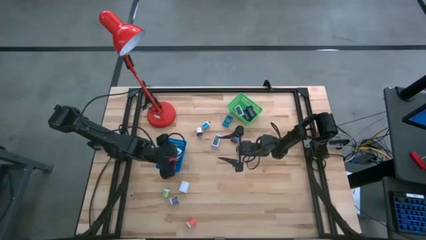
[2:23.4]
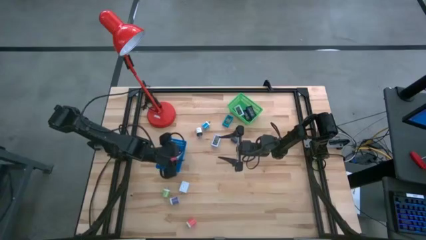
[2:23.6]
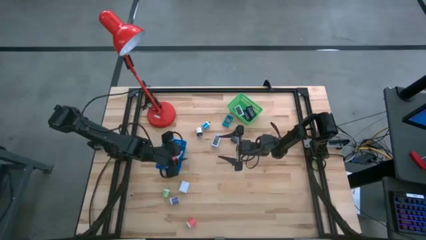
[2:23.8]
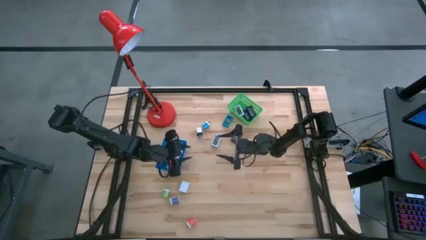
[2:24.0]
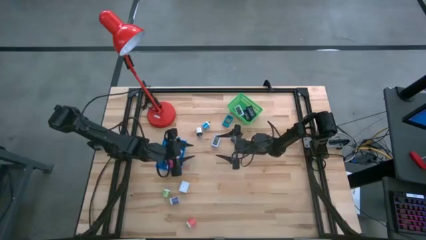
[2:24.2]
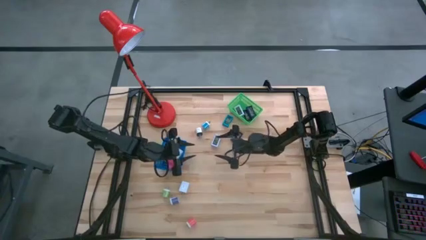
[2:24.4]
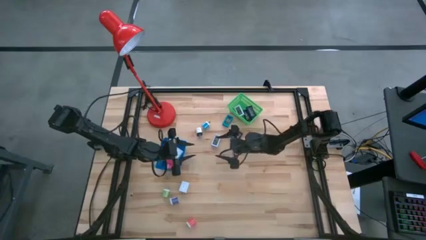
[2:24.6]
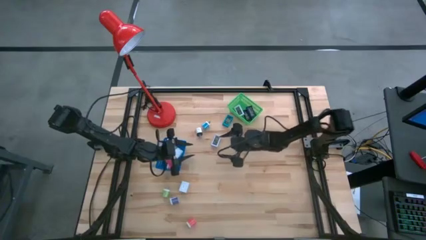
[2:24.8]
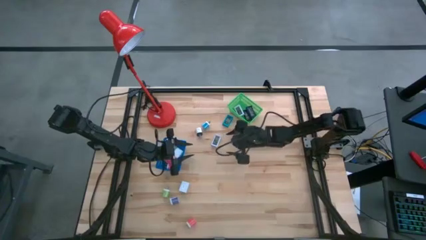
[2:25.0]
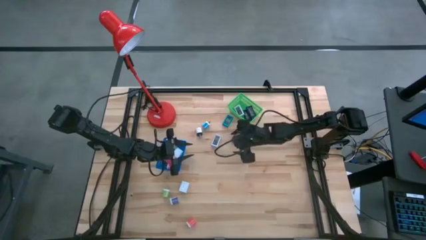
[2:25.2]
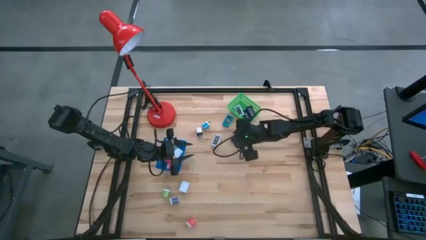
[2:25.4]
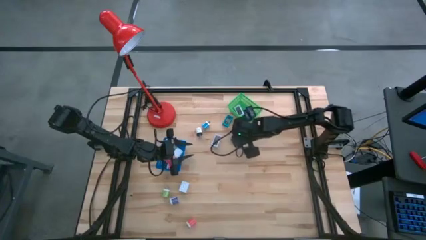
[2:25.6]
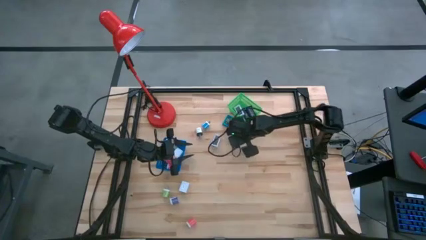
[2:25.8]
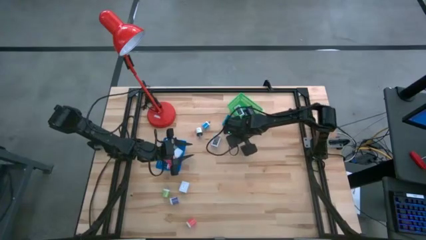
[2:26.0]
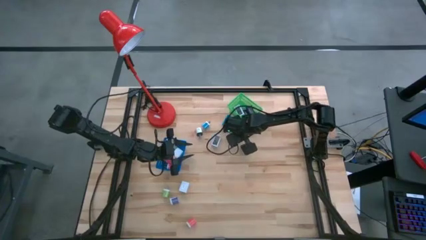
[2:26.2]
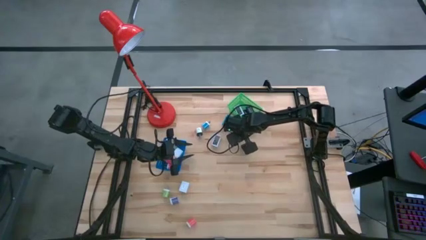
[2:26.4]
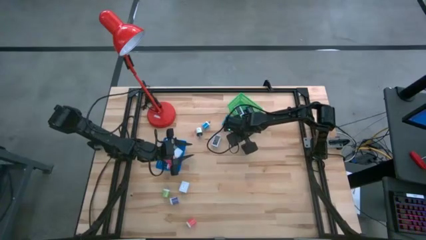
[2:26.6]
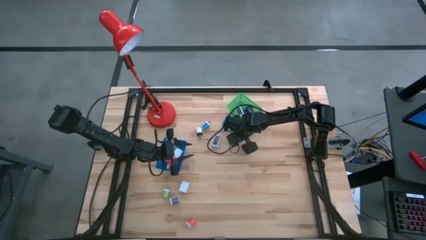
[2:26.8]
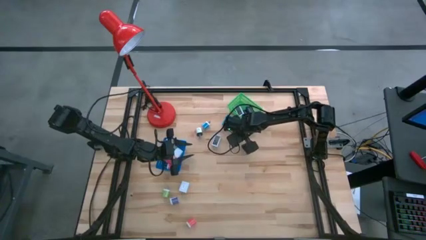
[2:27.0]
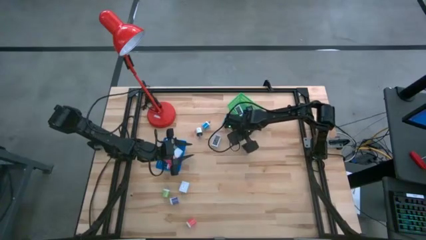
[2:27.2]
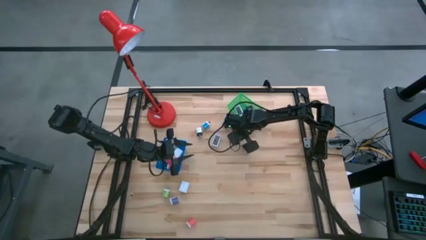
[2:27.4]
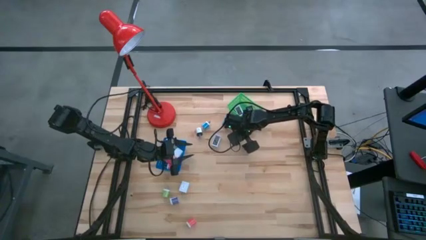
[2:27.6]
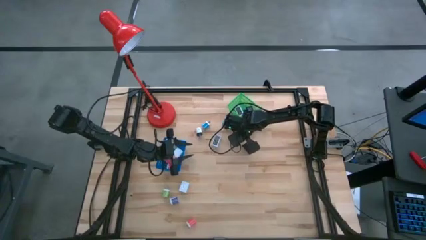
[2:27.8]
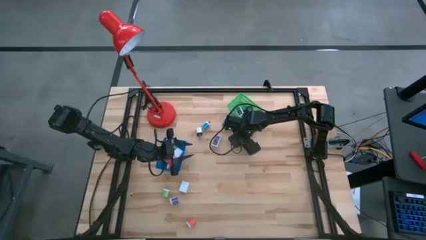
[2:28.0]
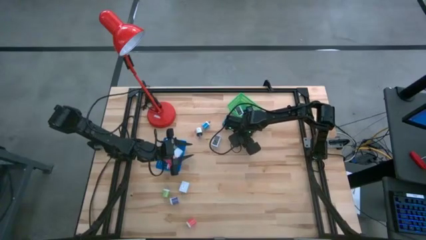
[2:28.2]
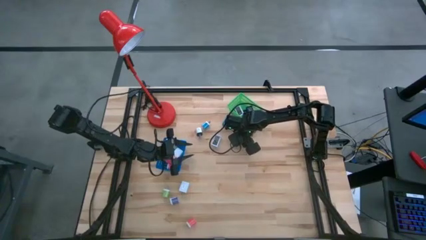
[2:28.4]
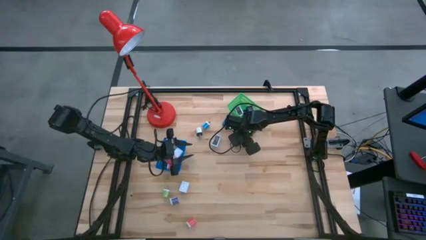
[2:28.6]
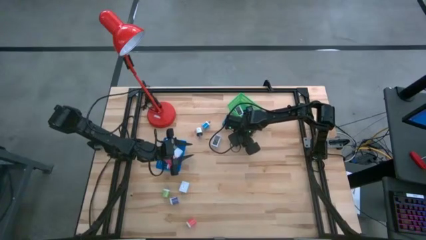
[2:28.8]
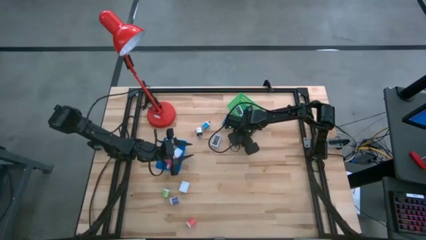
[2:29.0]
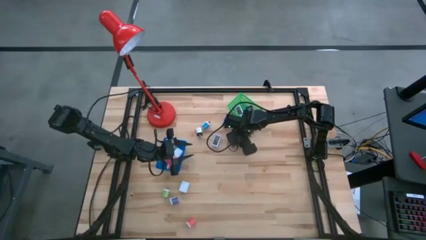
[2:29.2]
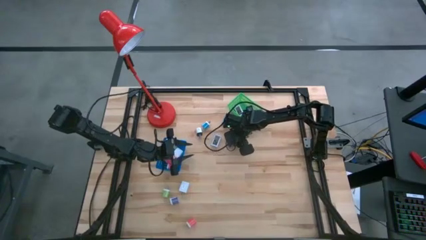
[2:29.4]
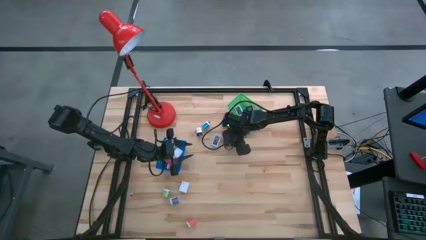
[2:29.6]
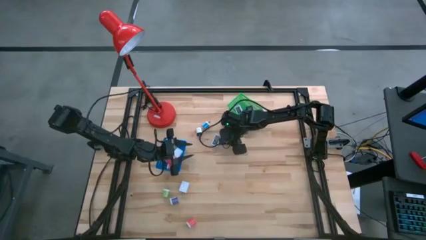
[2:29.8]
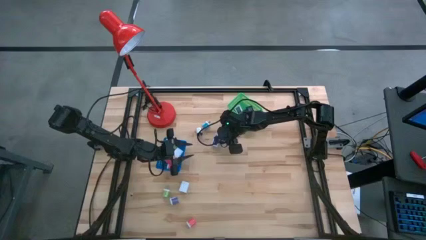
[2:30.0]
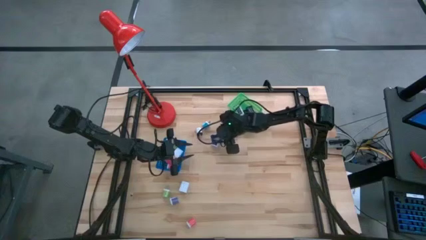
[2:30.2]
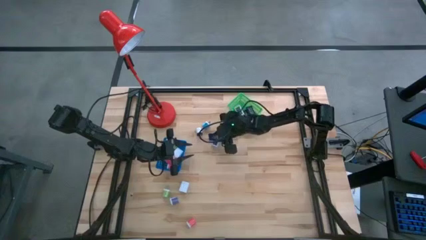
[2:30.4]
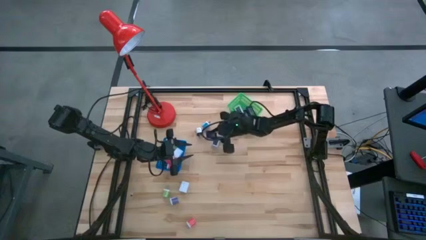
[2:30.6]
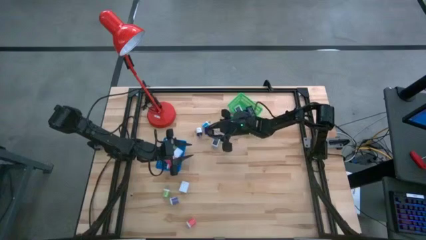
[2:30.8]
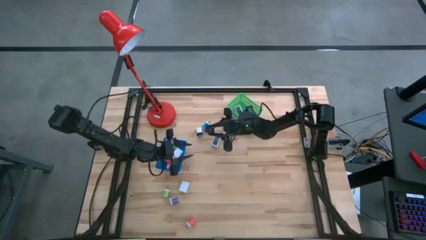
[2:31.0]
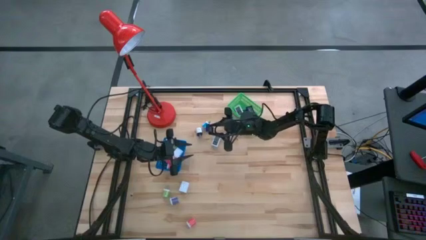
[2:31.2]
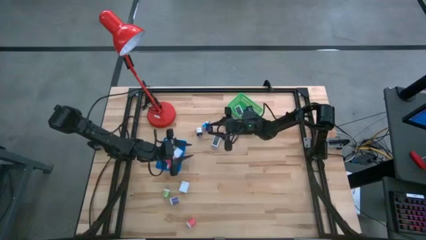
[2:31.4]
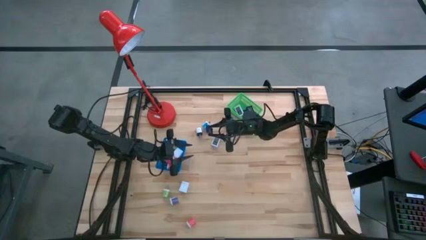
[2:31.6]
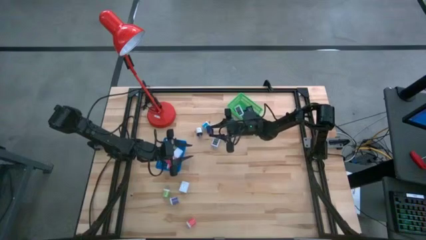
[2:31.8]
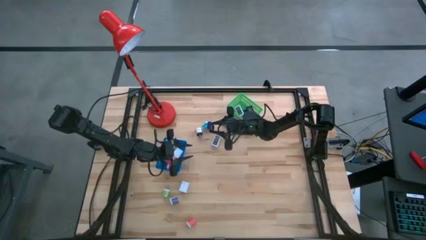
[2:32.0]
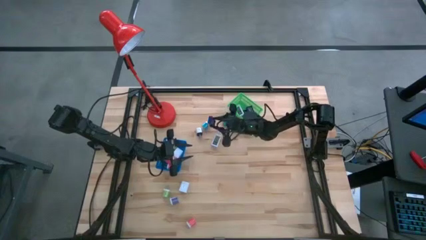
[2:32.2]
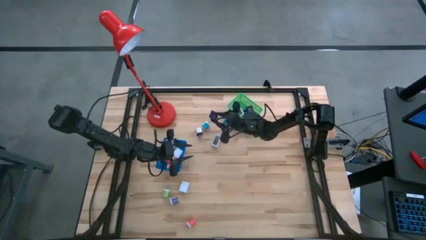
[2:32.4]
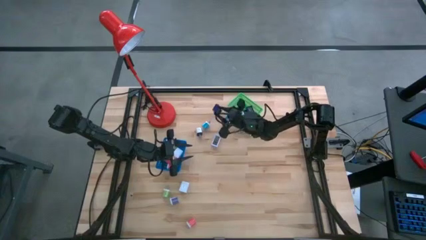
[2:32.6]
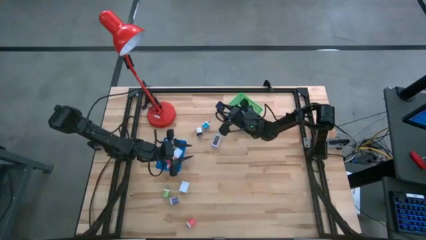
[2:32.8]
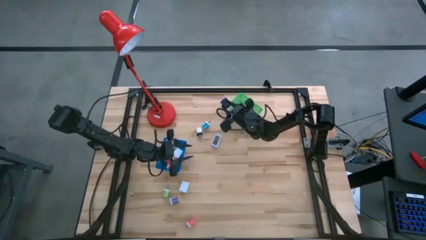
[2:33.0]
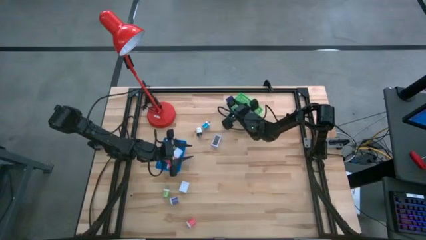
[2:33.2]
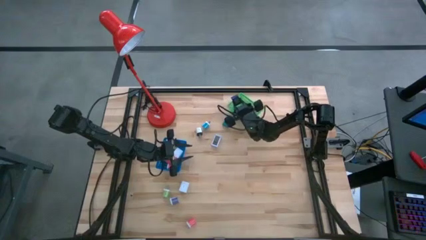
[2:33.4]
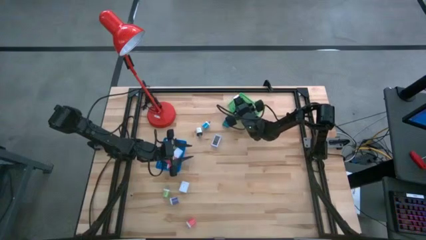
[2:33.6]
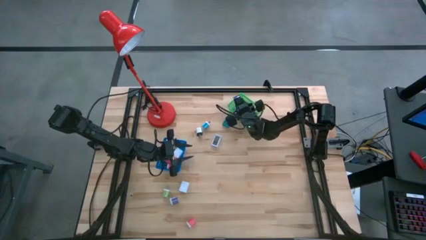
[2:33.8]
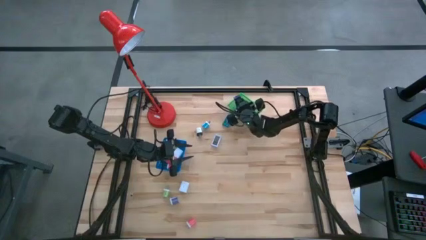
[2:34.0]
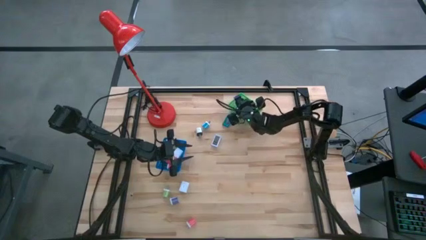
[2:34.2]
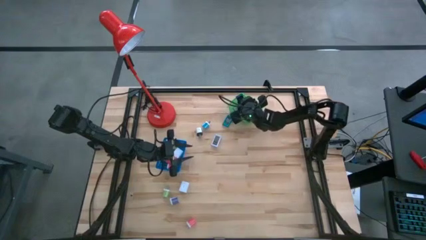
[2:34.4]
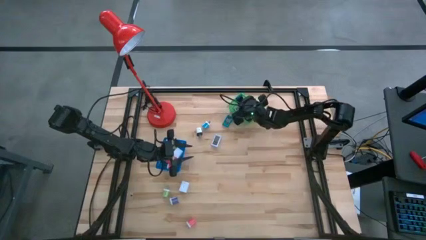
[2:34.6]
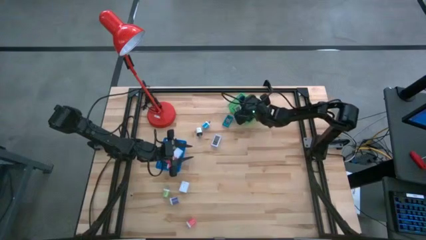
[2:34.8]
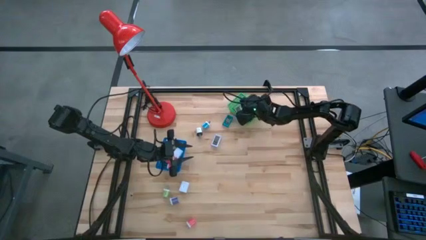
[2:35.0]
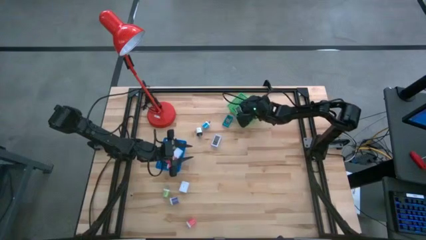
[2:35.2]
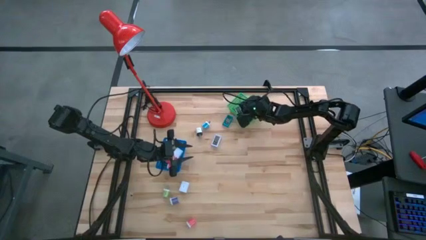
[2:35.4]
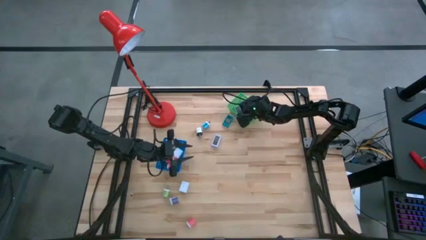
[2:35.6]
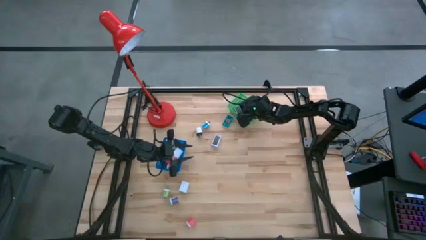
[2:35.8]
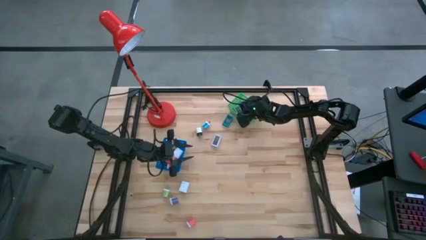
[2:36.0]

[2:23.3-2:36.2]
Task: Pick & Place Office items
Put the blue digital clock into the green basket
